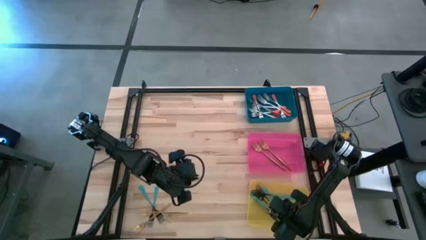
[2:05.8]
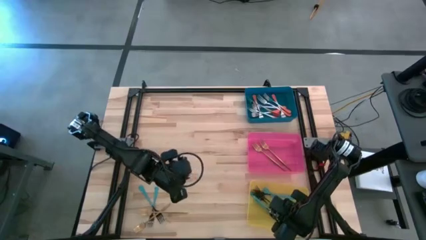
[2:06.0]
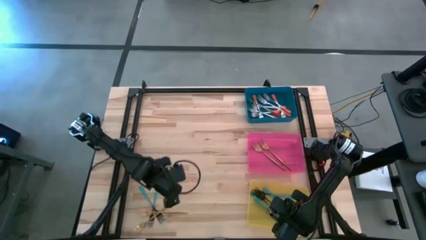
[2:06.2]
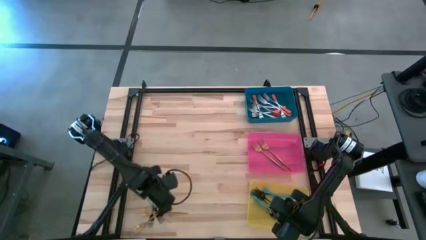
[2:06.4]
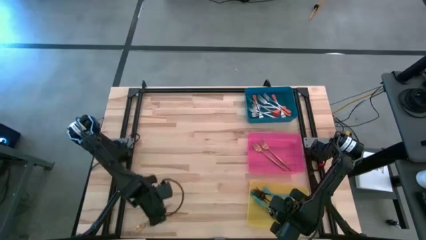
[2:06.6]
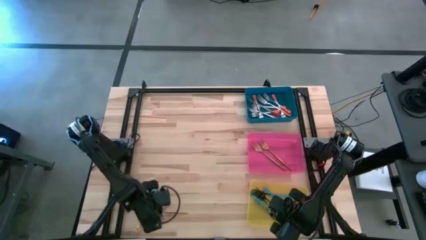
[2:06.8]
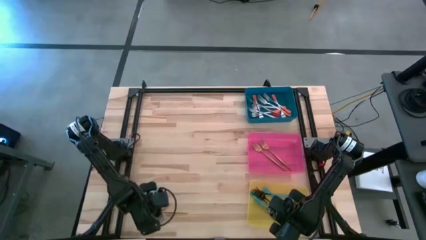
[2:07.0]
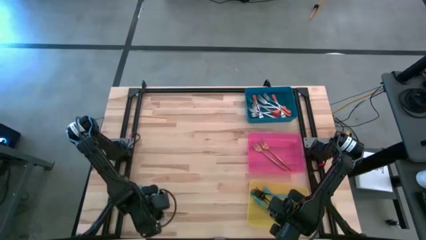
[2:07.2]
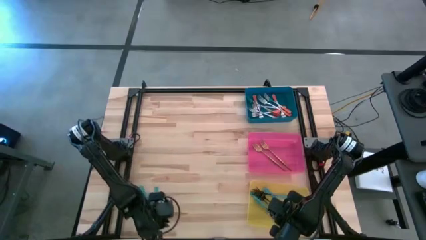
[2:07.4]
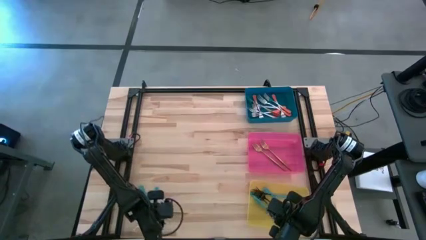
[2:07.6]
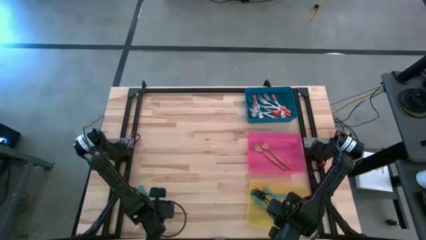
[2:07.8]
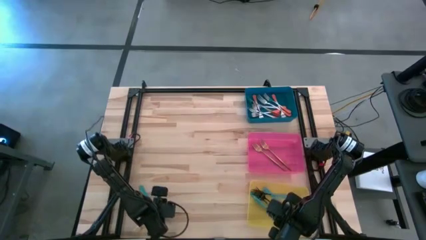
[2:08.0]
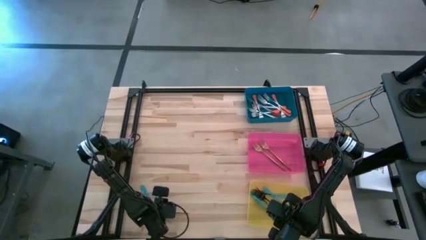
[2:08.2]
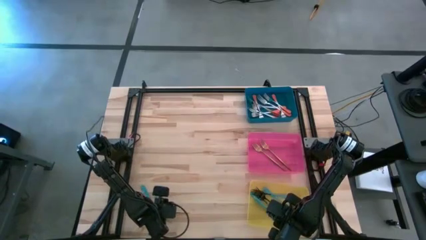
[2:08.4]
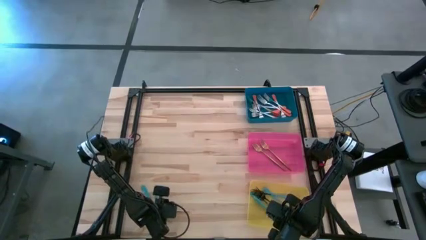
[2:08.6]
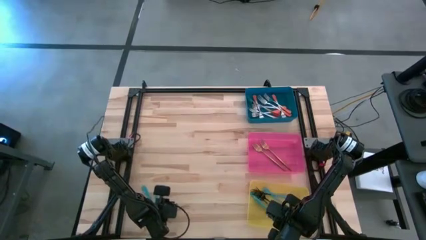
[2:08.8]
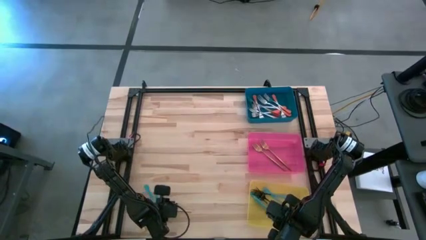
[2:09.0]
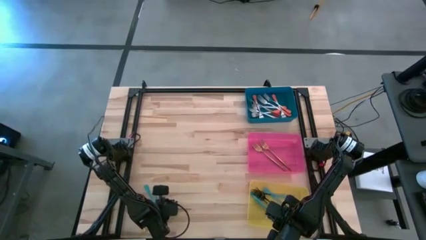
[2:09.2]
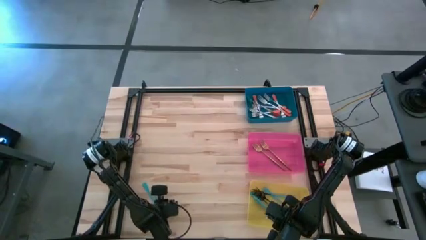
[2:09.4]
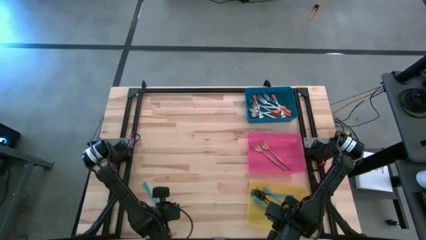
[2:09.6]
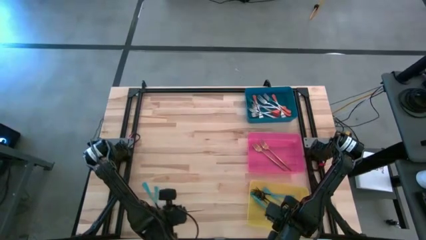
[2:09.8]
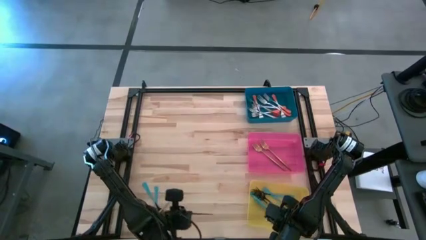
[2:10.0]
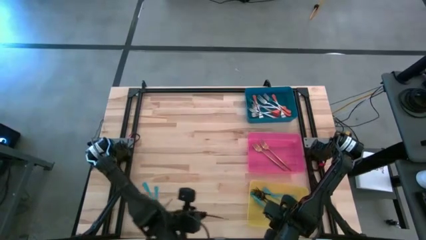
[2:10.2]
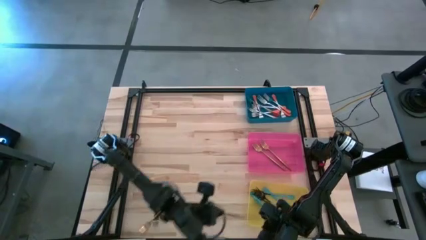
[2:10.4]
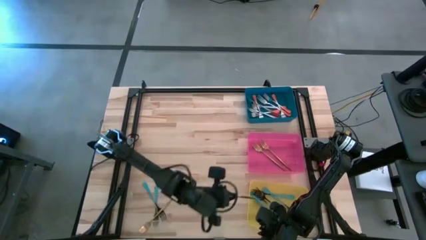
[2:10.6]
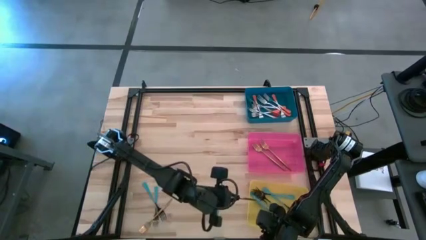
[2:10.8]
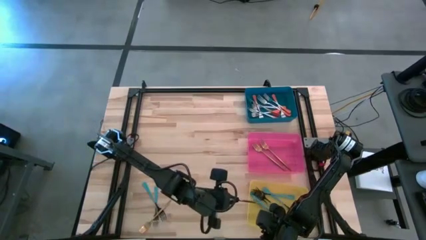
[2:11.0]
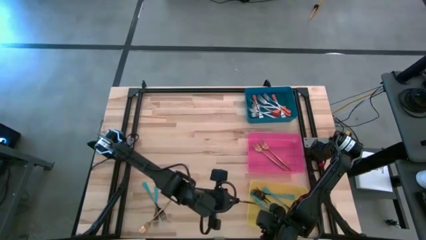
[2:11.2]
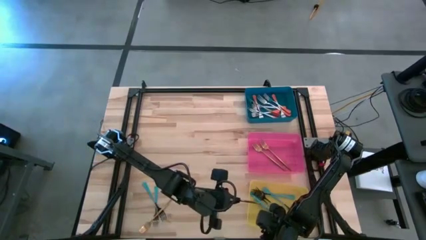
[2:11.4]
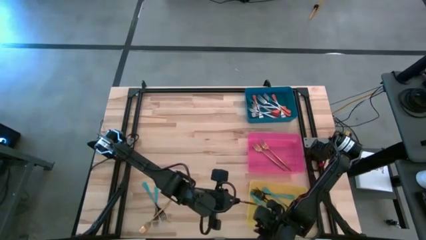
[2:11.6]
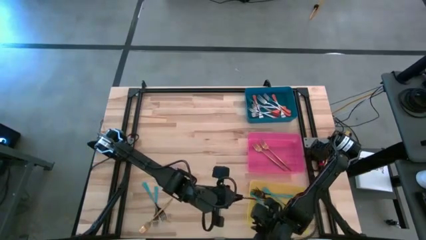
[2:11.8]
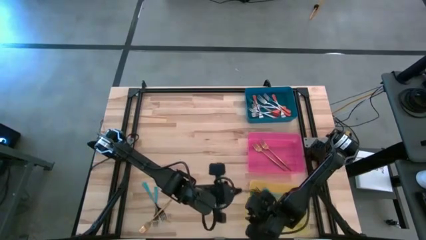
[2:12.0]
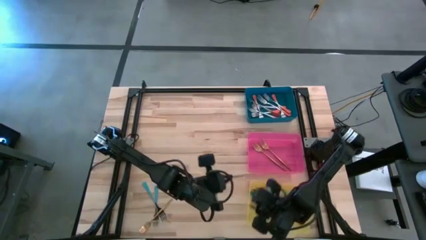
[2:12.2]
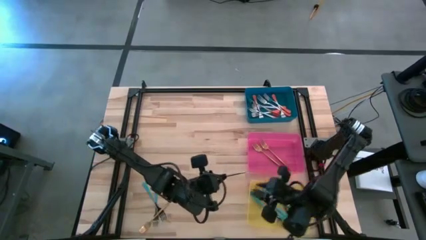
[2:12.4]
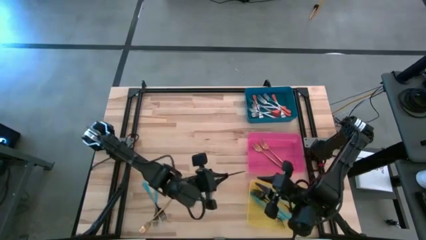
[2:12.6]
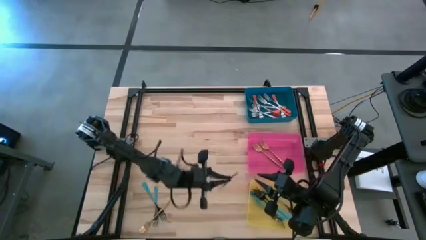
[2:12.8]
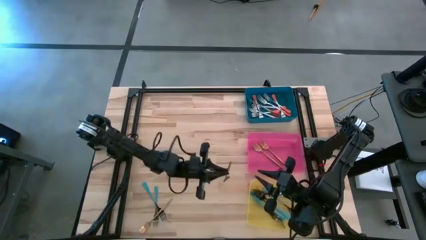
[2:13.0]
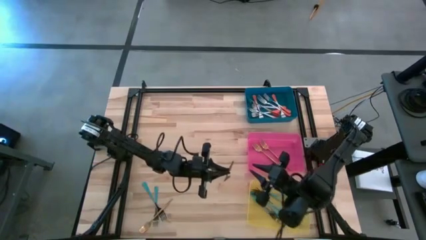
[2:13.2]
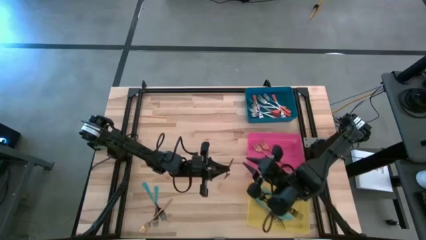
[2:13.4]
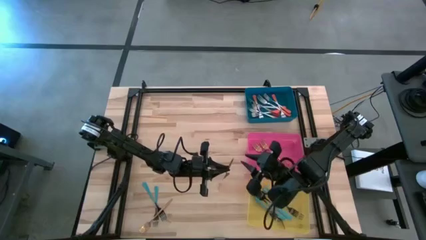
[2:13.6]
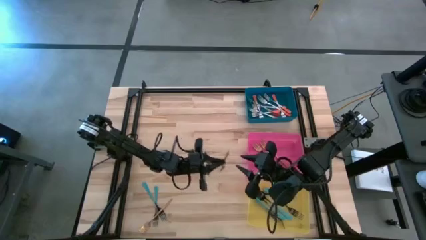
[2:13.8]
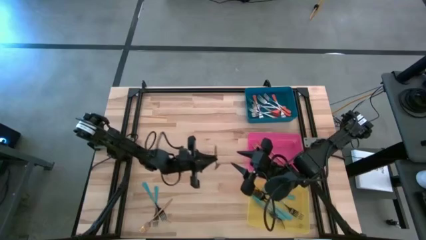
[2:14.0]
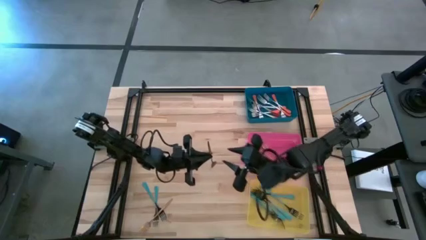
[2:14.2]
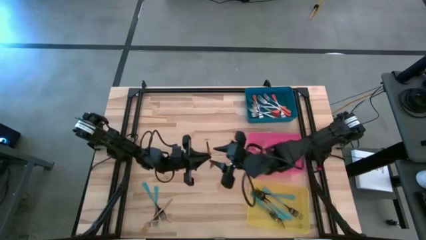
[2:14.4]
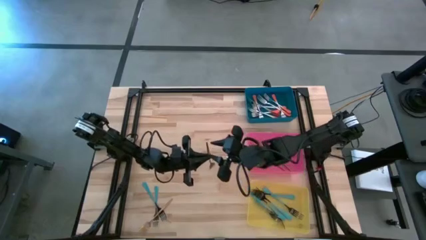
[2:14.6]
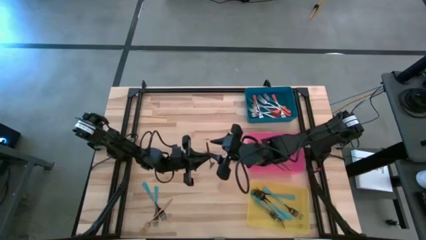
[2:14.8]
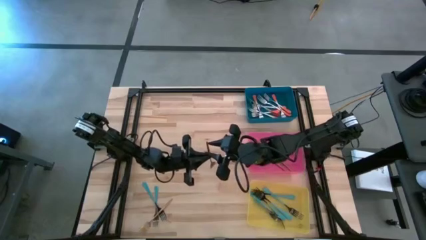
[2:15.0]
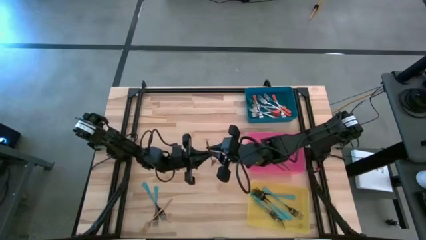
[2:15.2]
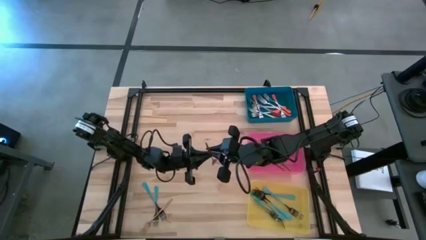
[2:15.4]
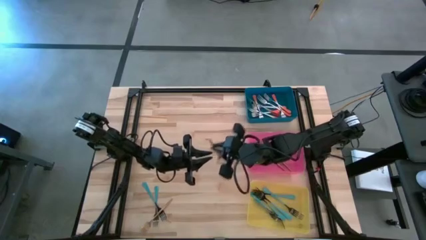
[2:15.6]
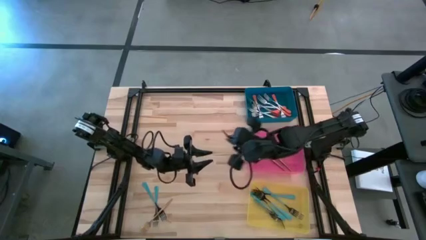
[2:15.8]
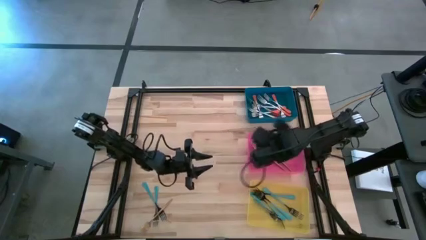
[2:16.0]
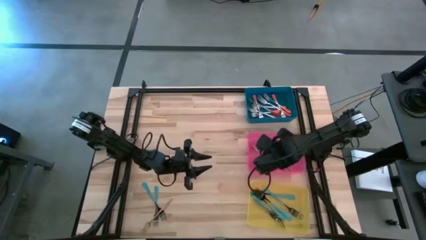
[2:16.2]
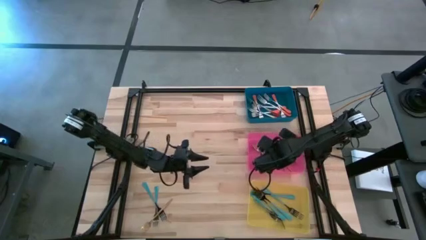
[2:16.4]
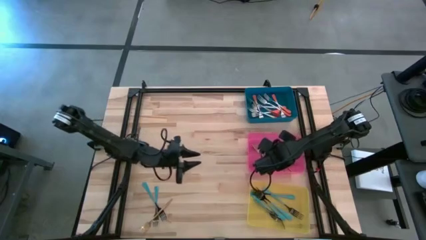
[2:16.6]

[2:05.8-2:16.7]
Task: Sort silverware by color (type)
Put the gold fork into the pink bin

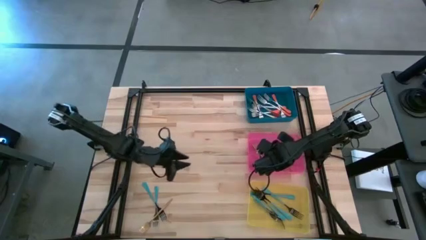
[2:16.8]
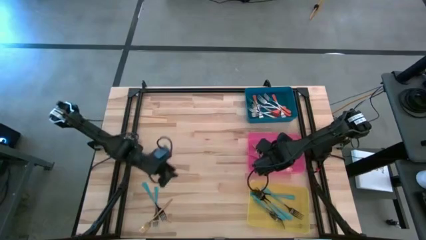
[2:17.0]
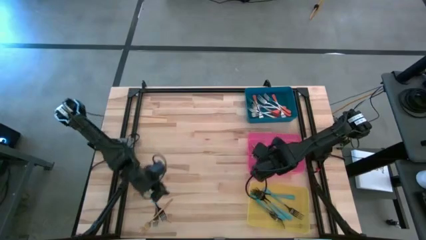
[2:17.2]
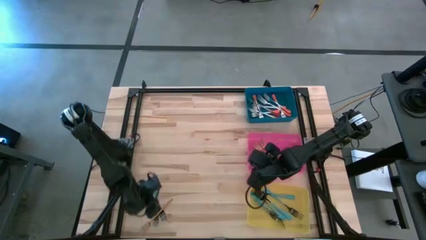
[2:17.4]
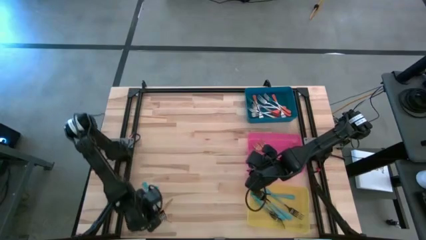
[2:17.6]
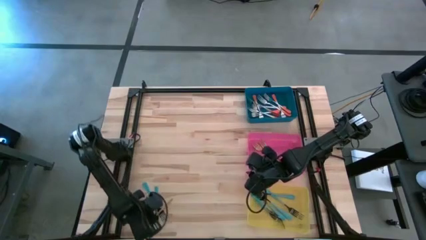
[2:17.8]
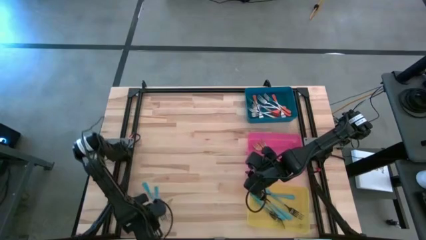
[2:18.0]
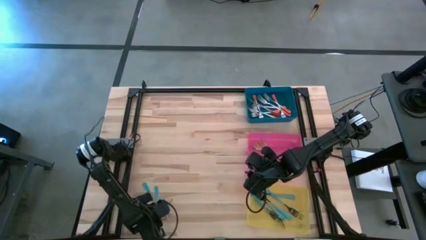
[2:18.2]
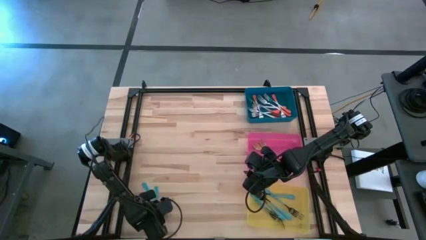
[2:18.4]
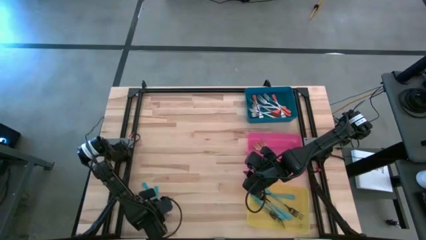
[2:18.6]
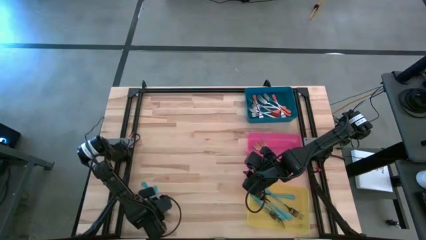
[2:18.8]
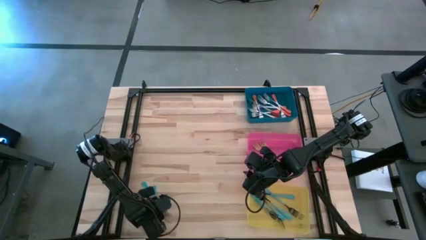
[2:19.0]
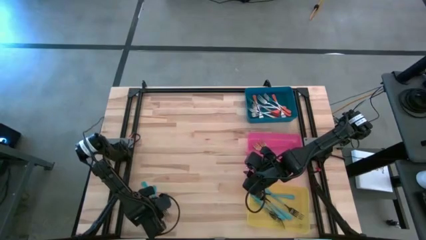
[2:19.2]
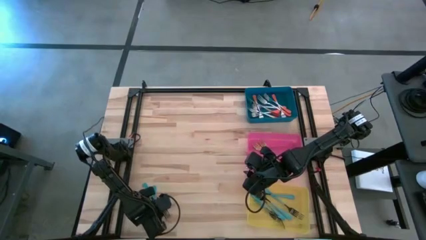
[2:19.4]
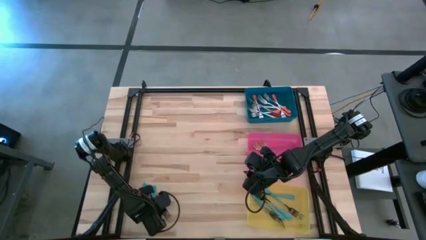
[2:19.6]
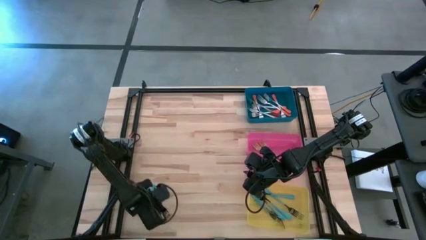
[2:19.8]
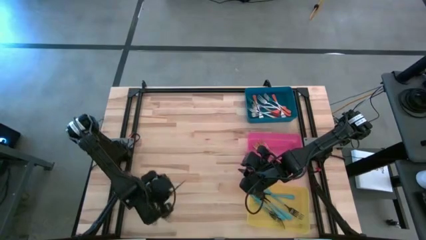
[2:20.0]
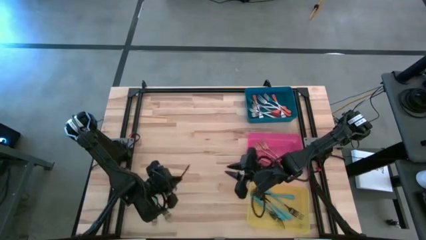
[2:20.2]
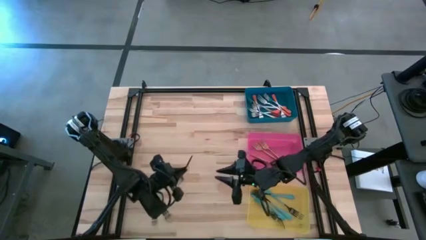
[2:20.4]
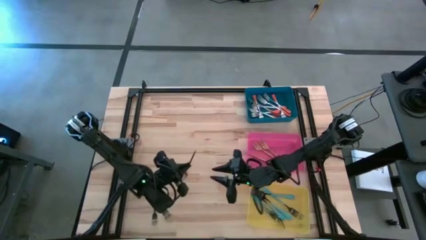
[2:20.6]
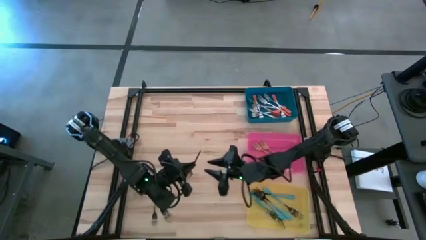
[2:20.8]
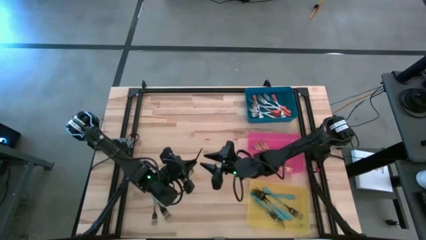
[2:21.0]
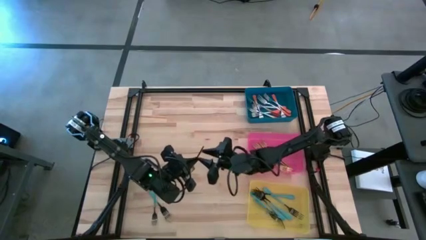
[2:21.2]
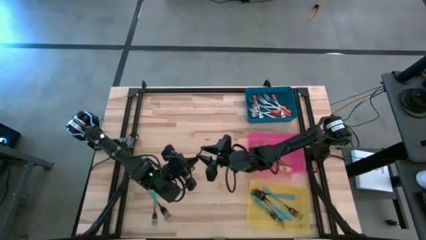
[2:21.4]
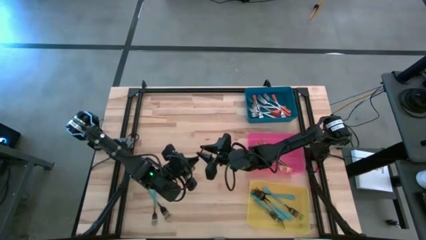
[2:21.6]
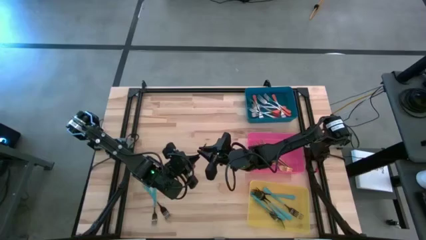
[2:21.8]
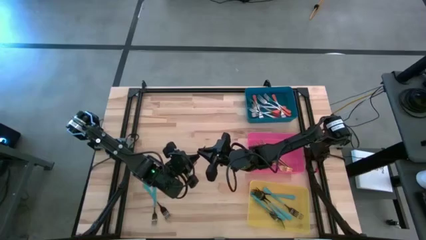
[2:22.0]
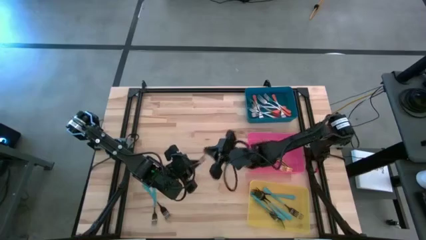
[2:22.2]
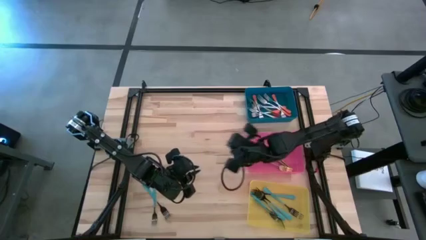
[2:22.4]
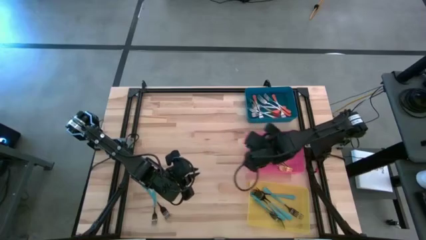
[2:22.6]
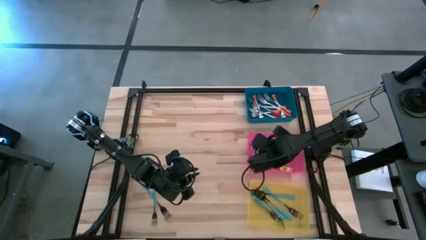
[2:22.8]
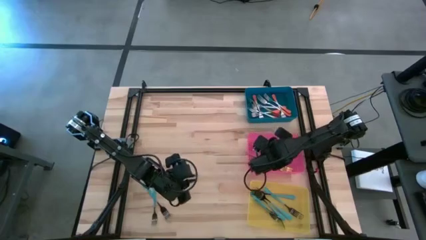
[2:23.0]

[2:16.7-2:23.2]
Put the gold fork into the pink bin
